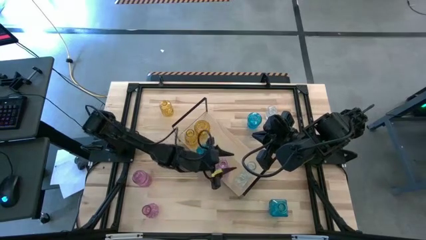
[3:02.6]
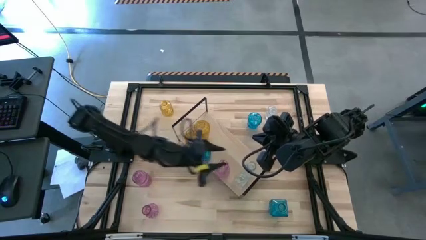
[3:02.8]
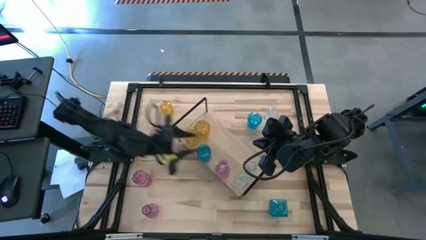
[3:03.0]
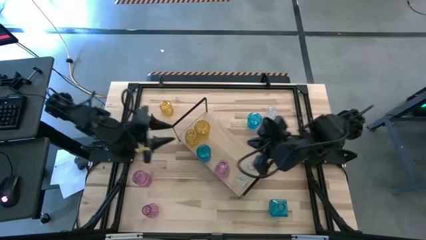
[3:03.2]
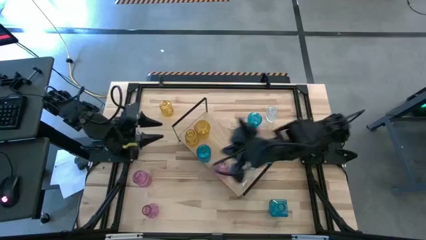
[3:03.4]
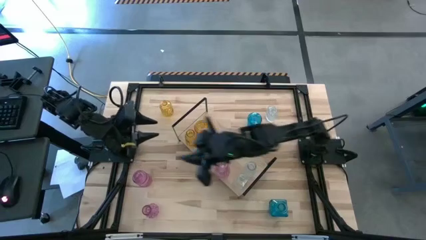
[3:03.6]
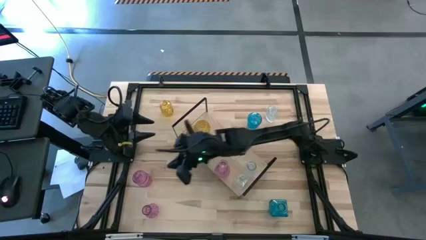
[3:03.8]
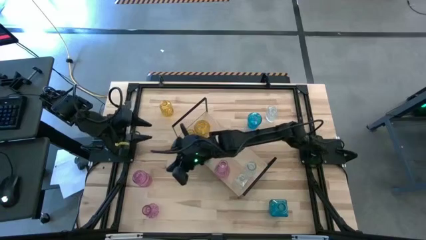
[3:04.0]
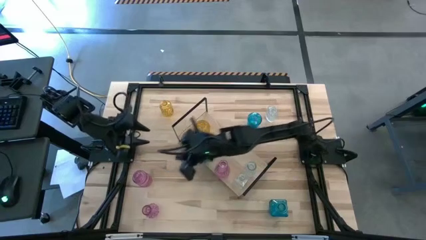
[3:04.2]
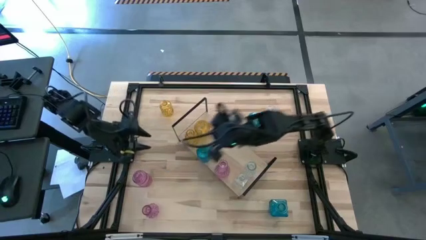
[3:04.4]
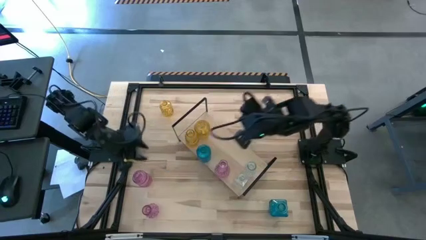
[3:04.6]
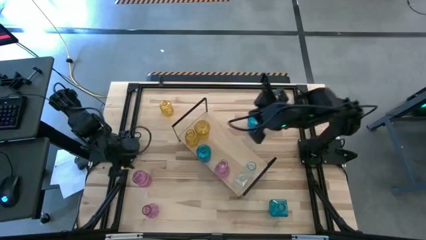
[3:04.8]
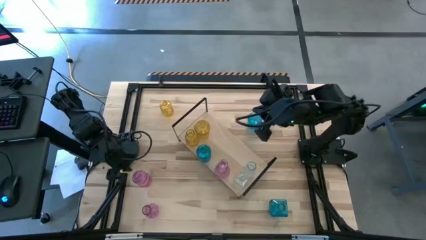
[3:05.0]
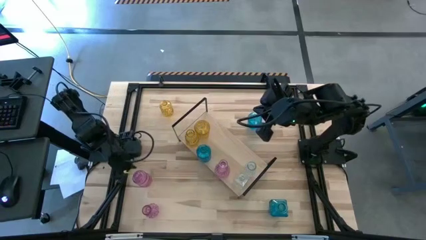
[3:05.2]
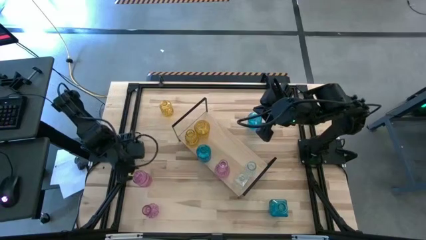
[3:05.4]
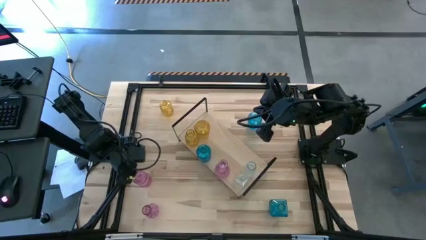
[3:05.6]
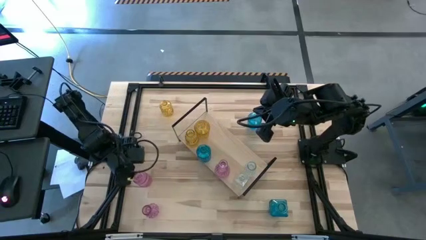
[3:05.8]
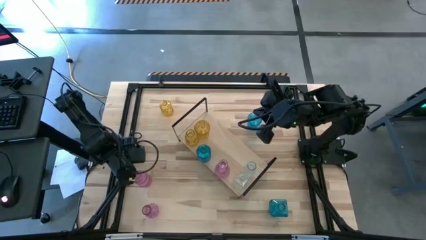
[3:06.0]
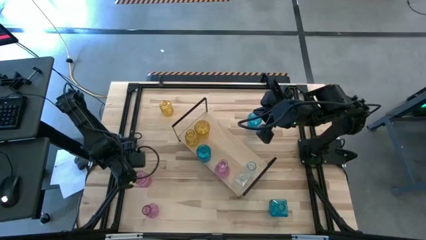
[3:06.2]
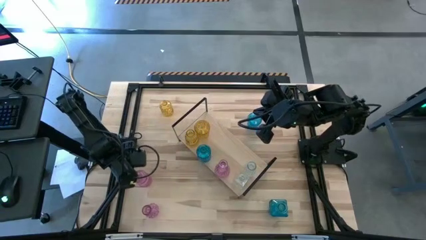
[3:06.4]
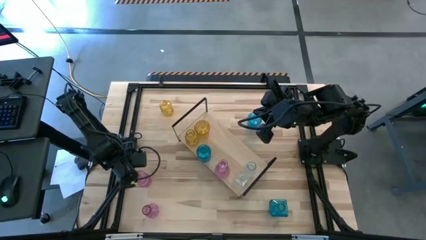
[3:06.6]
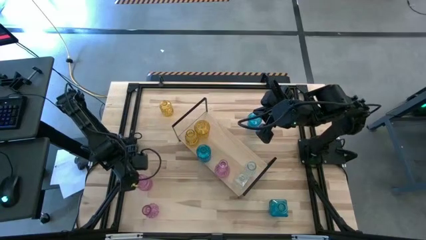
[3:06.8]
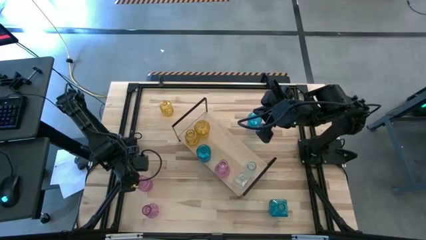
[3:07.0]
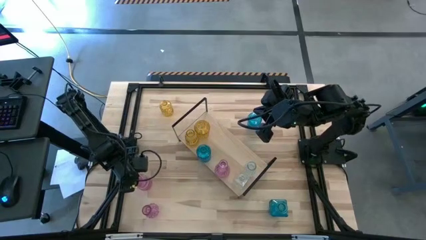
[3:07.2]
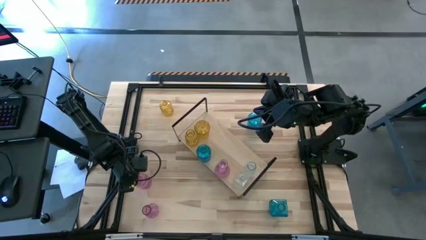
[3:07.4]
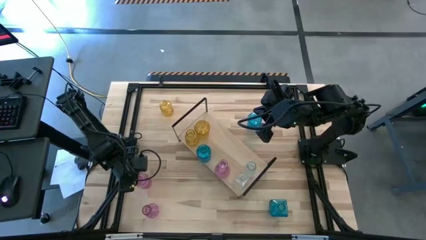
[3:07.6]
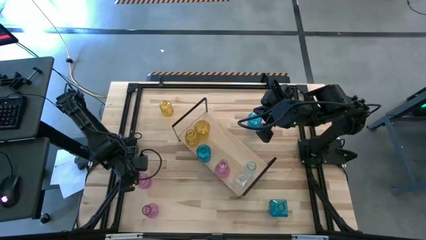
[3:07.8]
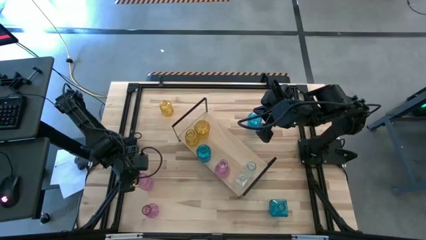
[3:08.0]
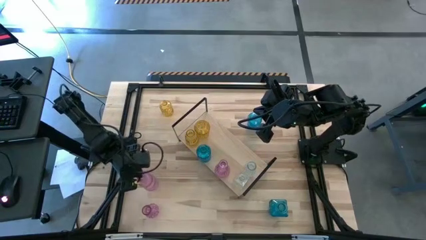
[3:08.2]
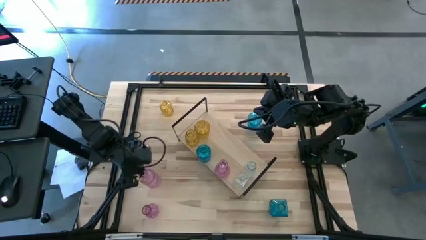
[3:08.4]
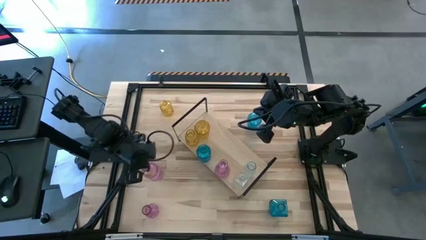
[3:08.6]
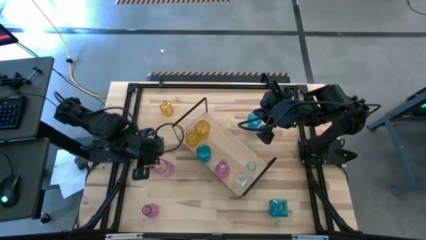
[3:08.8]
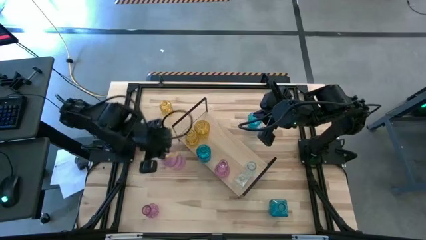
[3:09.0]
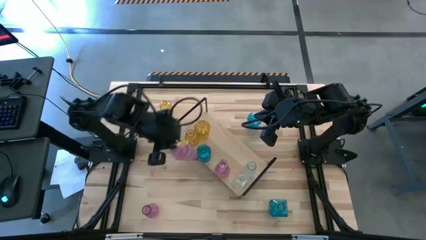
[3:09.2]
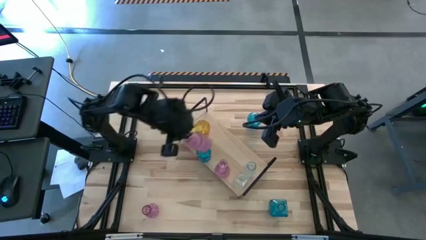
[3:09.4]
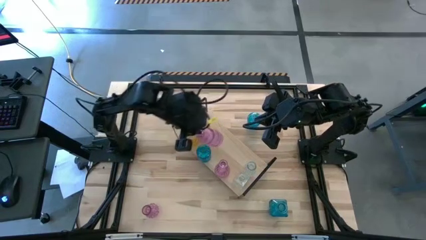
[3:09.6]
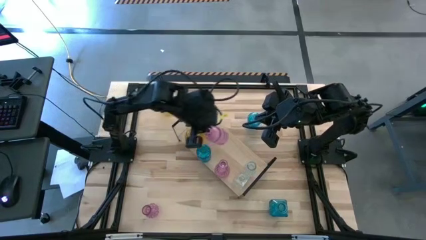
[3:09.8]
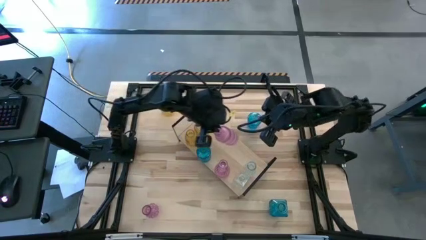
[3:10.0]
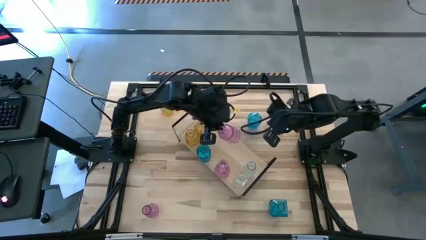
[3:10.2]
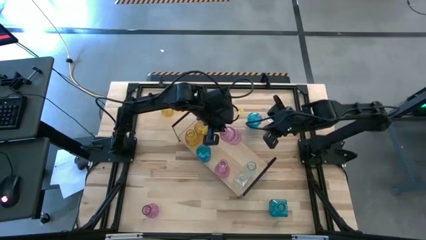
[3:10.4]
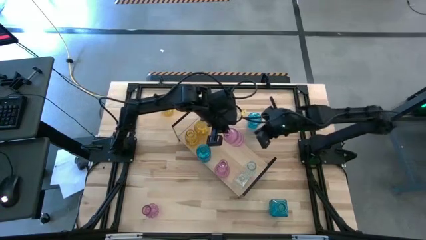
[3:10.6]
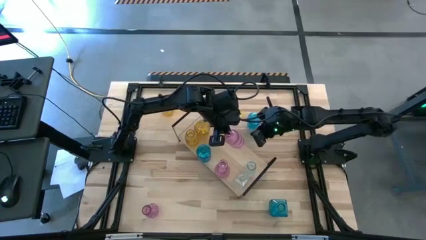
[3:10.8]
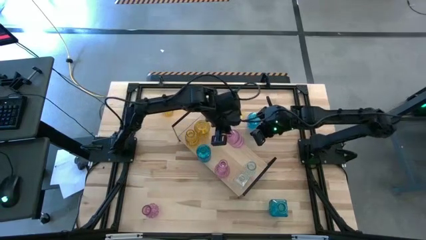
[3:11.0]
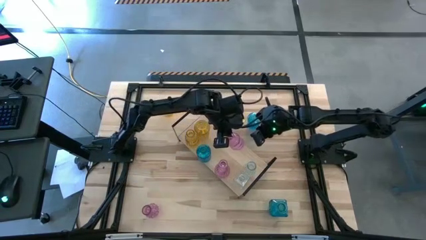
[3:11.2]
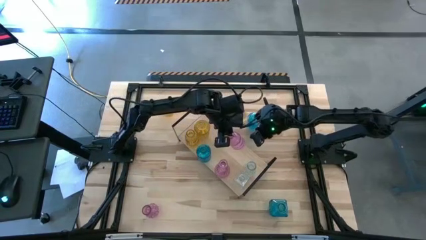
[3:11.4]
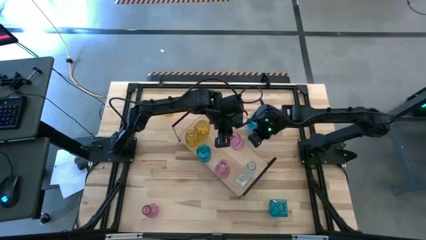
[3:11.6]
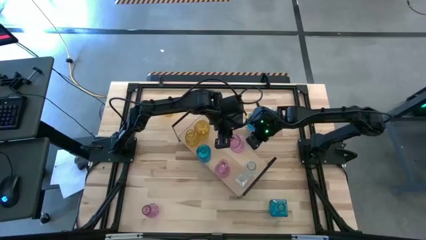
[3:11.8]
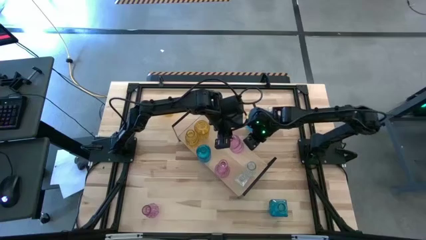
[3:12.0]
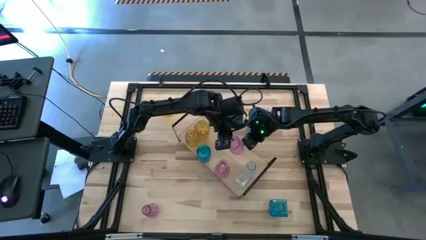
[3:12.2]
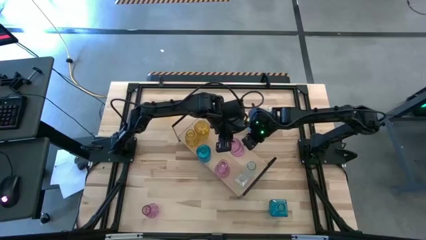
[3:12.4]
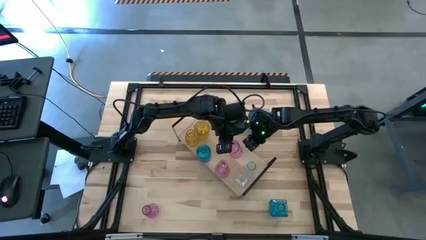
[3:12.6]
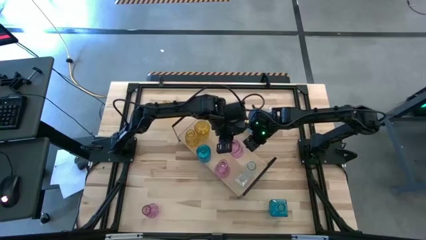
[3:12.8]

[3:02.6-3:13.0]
Task: sort vases onto shelf
Put the top pink crystal vase on the shelf
